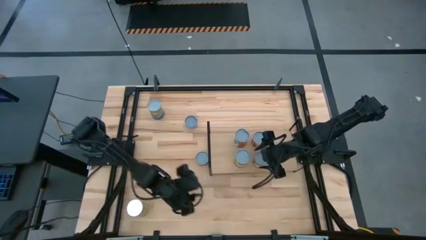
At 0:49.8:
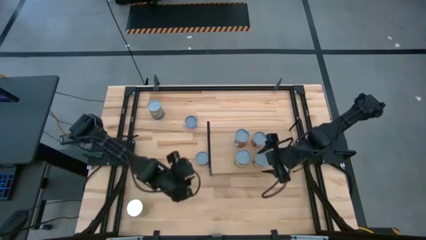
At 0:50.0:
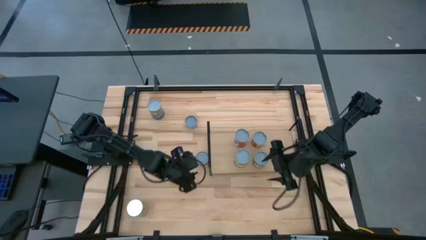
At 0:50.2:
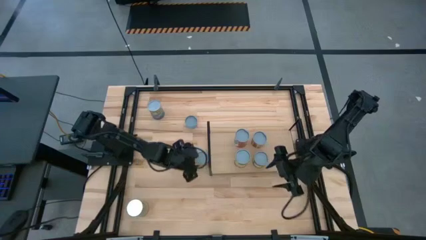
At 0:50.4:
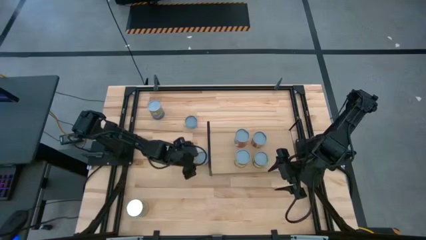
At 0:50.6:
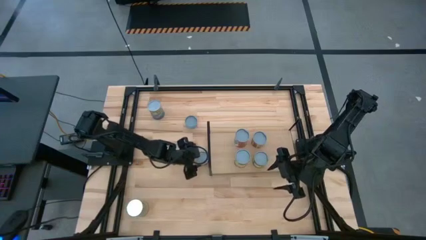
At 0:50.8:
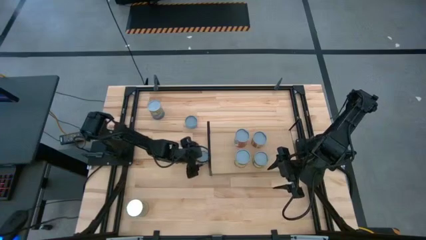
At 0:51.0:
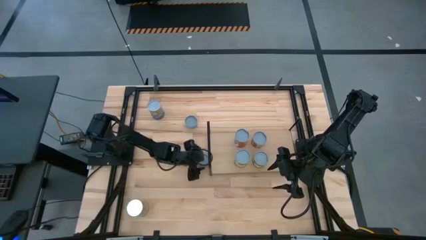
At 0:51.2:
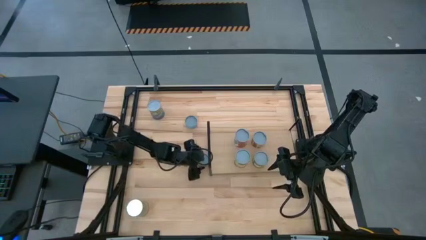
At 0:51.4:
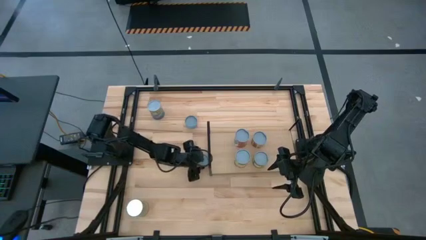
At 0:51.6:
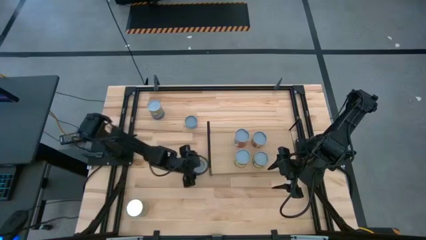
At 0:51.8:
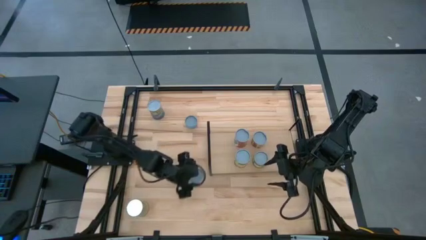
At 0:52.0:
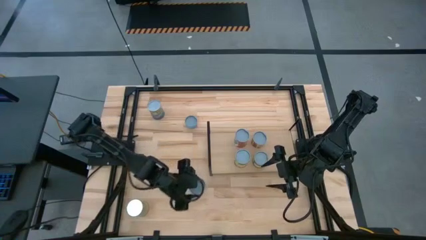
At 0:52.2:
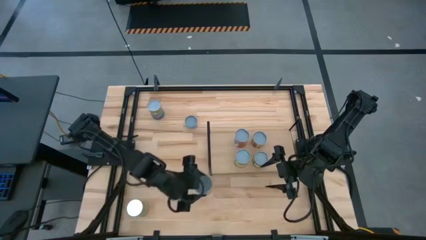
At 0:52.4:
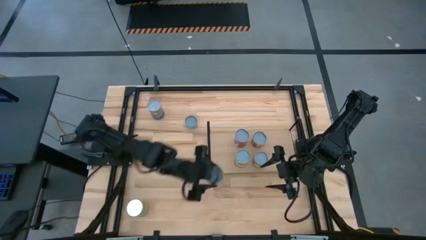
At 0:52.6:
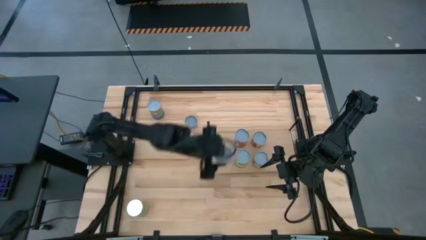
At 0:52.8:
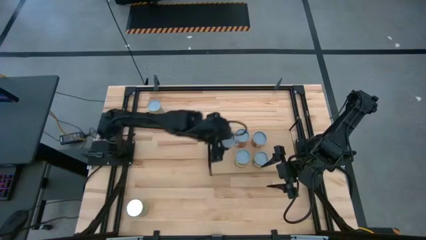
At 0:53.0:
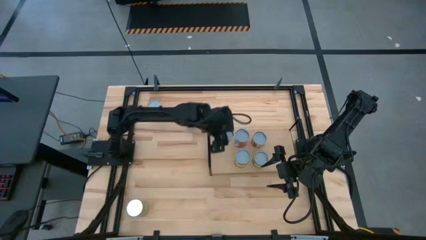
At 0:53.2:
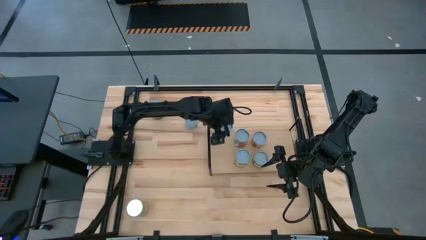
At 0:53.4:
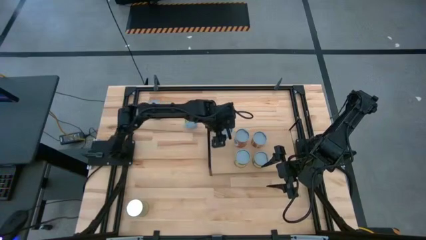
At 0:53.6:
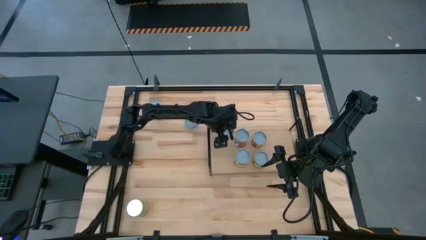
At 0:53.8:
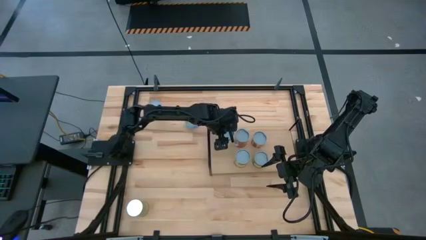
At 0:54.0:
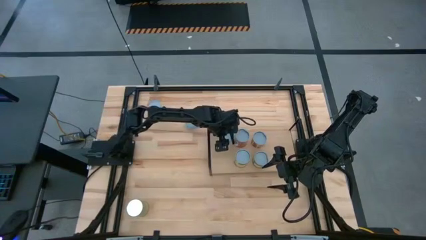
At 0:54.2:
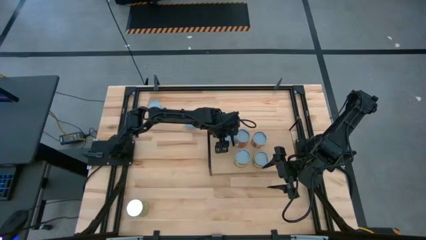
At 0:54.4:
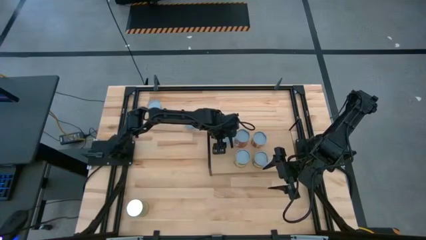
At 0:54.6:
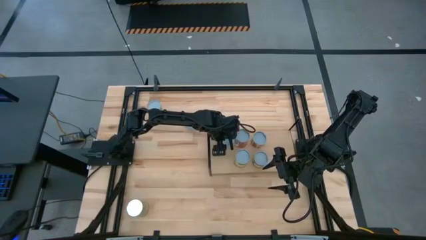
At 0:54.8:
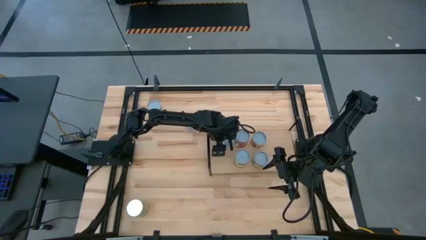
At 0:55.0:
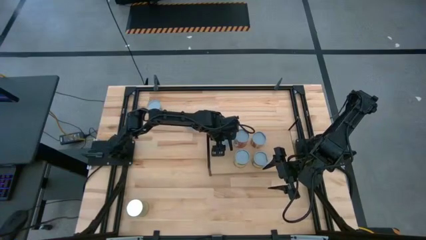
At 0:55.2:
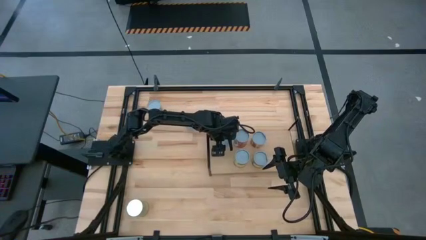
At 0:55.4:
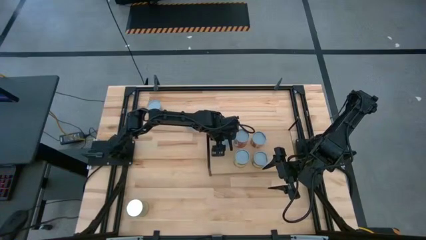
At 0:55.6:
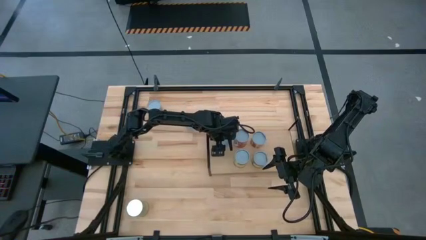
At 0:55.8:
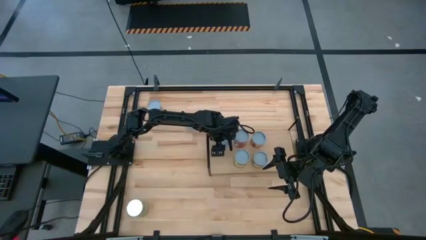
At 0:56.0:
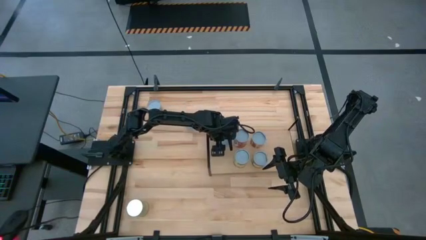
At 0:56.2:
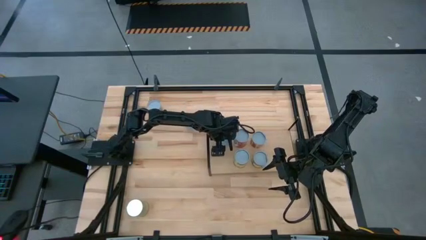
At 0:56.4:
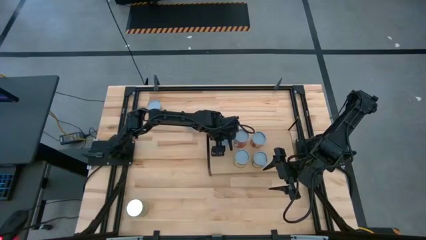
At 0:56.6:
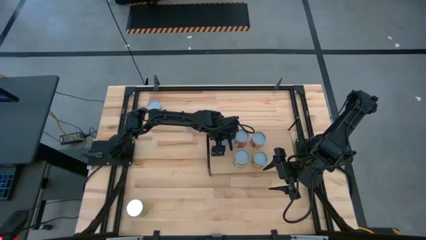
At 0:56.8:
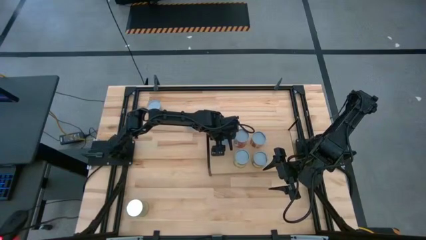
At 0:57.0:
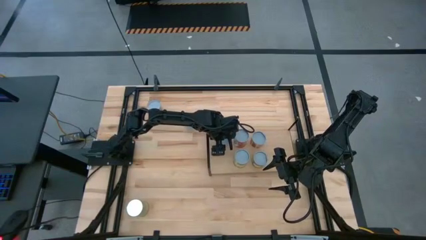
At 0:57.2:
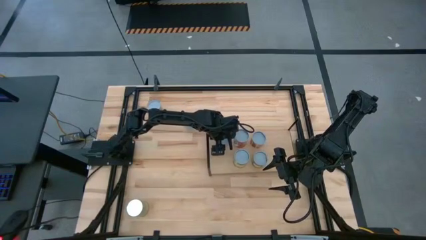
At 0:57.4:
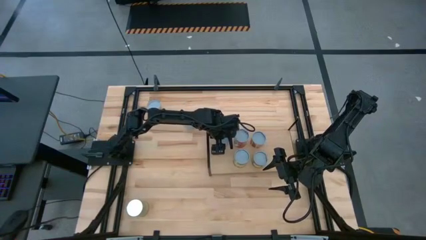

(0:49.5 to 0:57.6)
Task: Pick and place cans onto a shelf
Put the yellow can on the shelf aligned with the light red can

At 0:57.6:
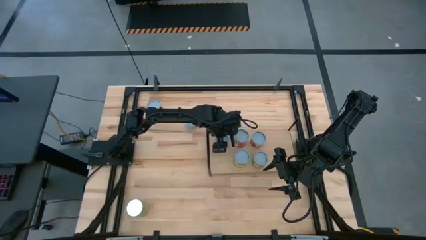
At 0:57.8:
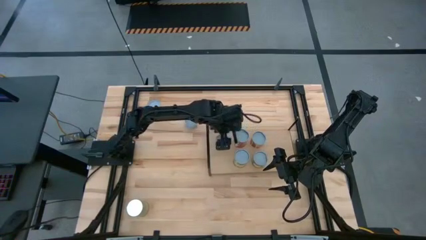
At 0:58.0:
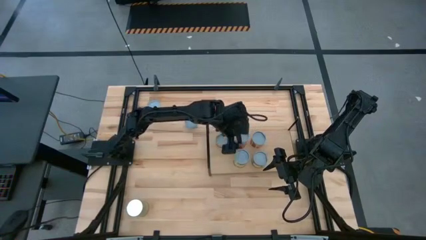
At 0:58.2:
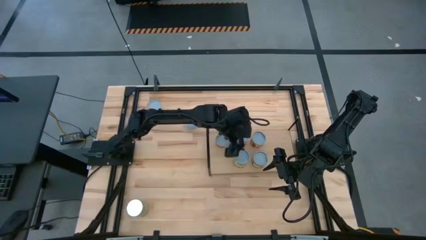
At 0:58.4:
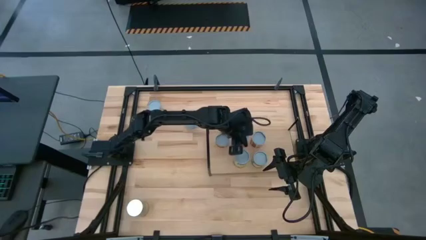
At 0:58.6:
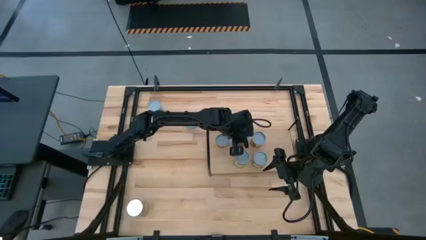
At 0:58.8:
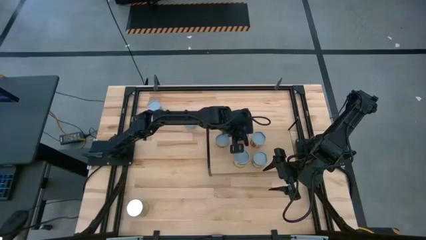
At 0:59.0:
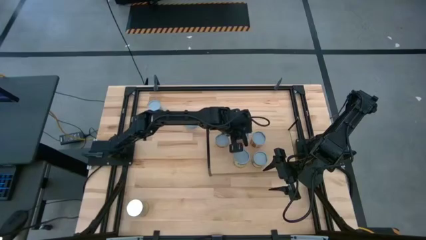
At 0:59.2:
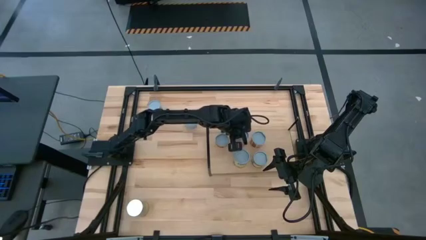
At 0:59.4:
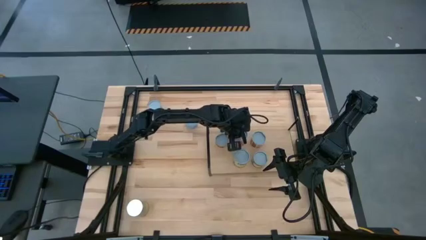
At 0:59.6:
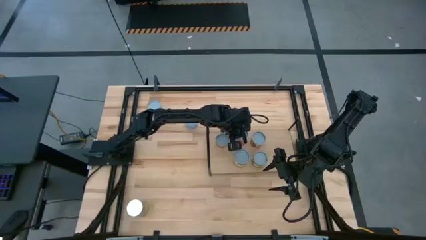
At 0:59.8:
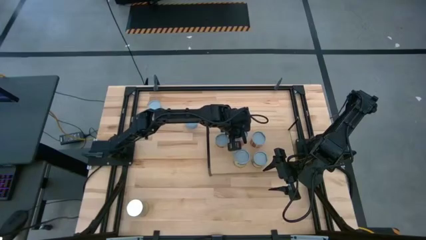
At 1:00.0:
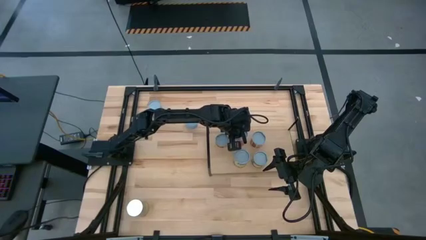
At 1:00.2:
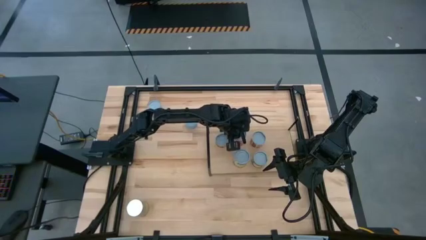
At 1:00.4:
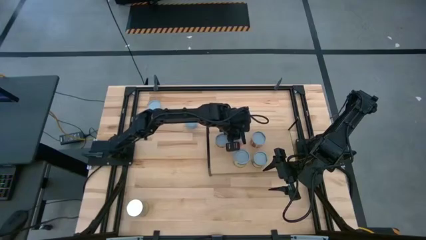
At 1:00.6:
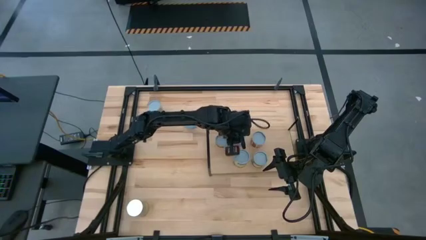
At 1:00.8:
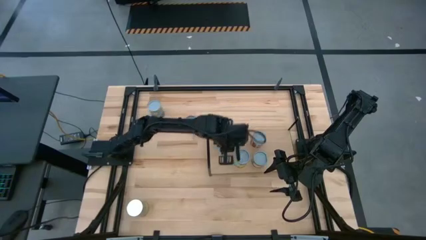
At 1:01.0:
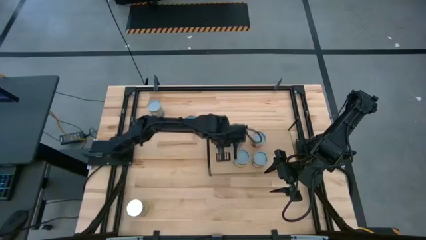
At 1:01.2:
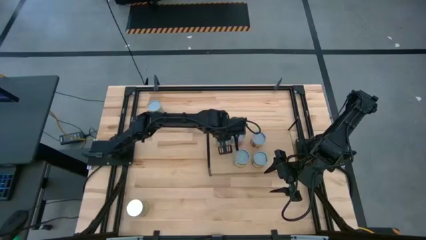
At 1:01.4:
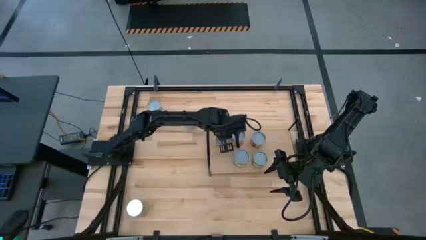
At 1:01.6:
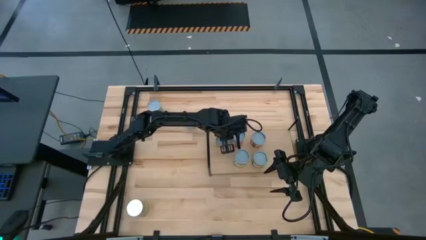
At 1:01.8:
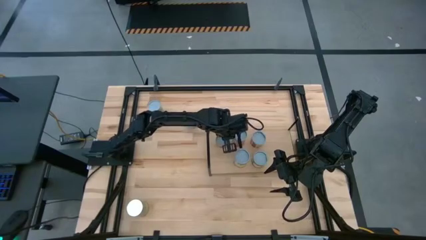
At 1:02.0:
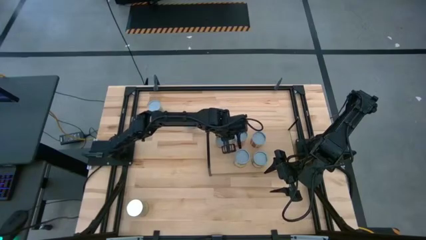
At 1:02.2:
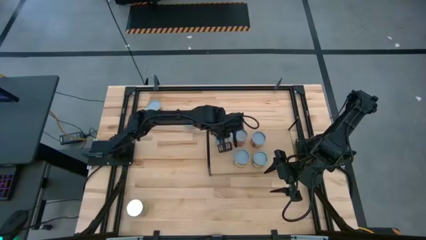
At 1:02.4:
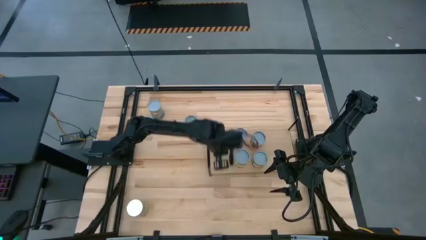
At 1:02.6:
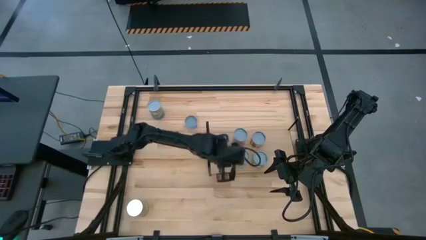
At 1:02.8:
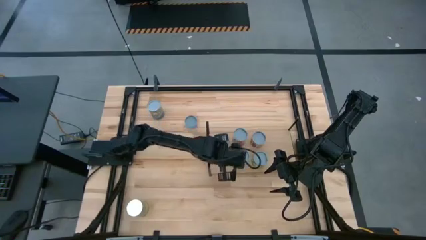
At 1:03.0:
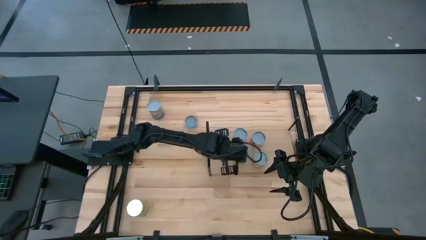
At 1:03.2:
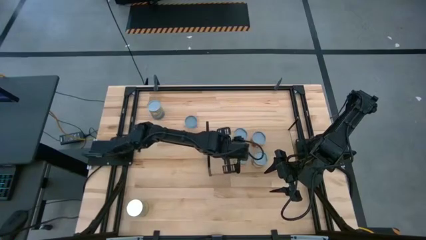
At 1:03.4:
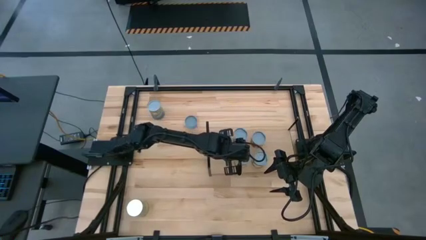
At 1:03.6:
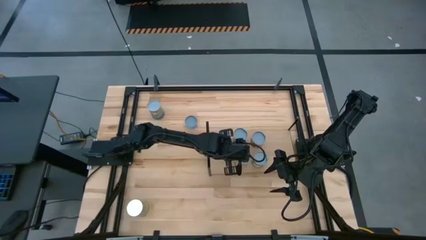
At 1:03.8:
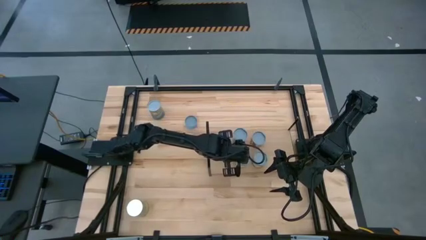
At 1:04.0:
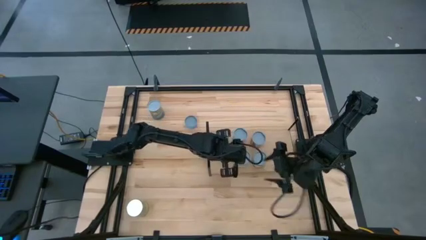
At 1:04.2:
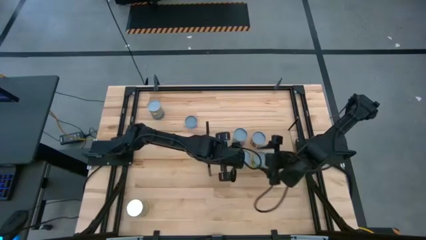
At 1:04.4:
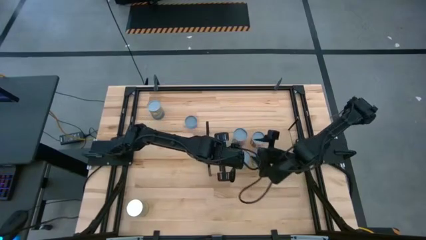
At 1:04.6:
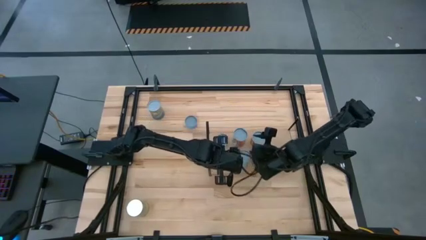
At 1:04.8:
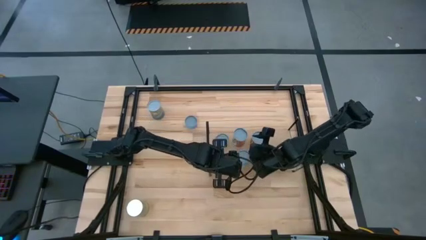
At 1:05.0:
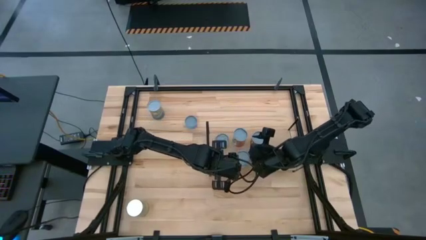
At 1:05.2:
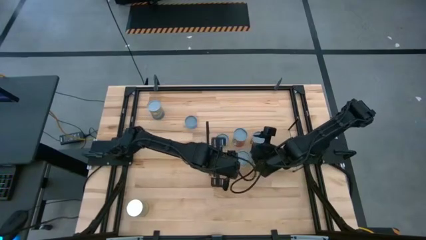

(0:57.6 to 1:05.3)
Adjust the cans on the shelf
